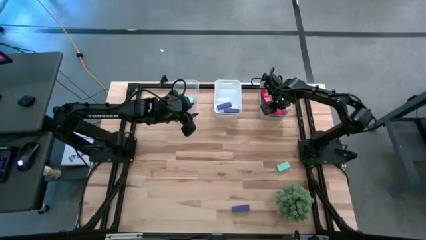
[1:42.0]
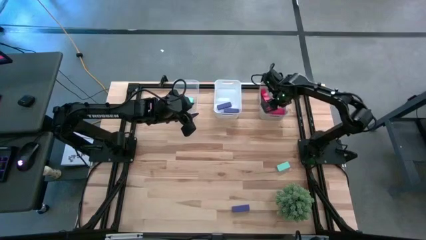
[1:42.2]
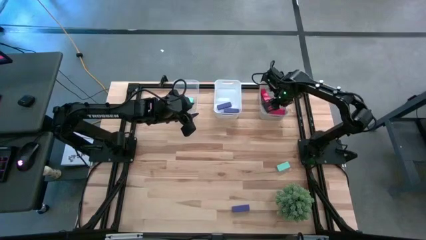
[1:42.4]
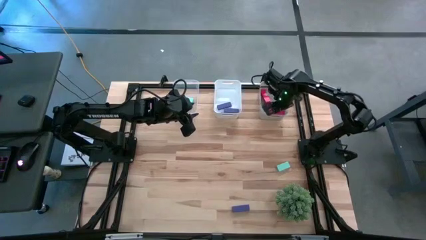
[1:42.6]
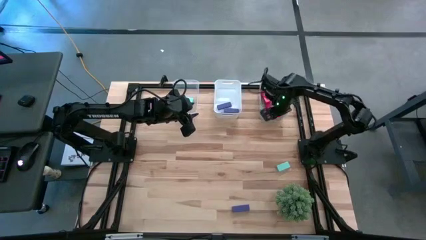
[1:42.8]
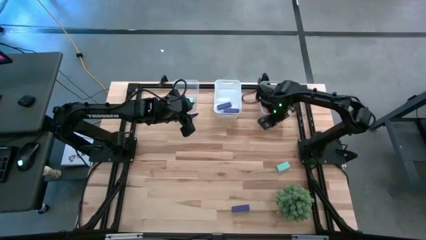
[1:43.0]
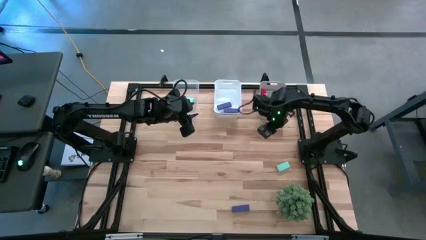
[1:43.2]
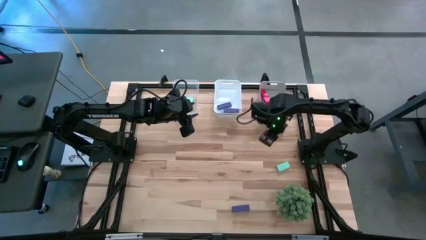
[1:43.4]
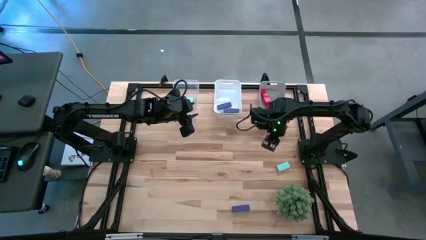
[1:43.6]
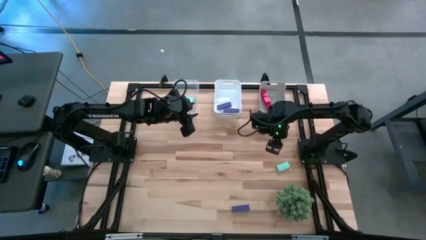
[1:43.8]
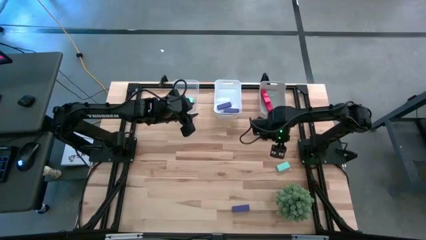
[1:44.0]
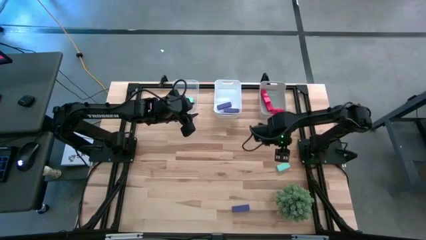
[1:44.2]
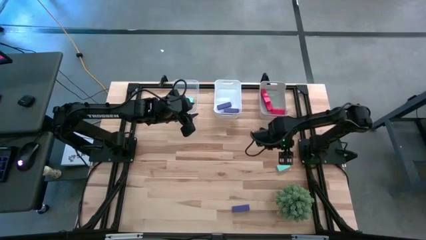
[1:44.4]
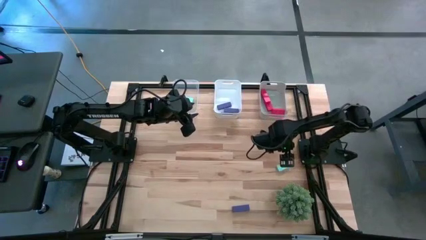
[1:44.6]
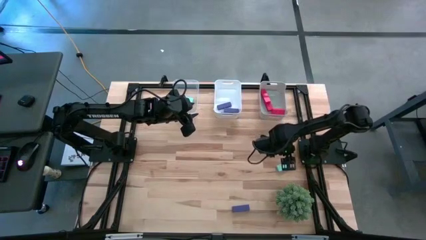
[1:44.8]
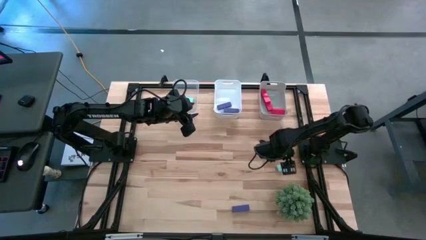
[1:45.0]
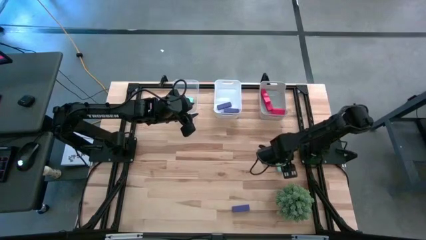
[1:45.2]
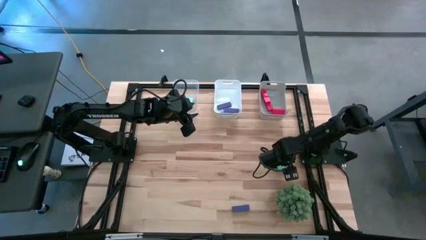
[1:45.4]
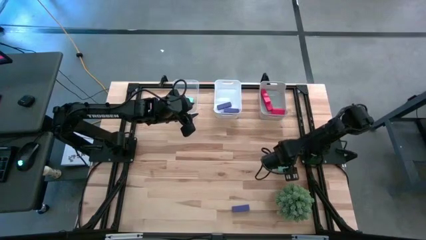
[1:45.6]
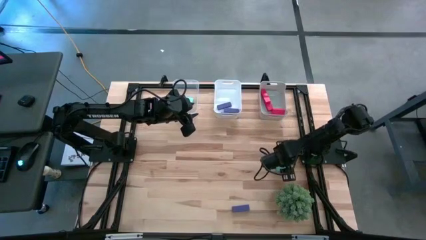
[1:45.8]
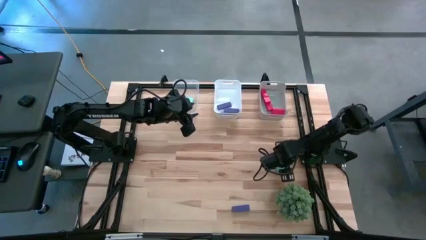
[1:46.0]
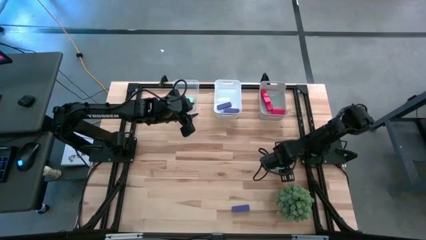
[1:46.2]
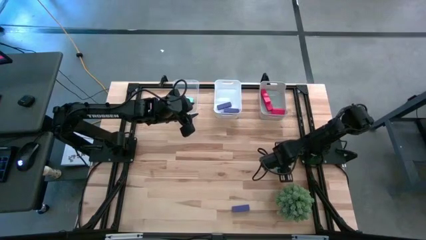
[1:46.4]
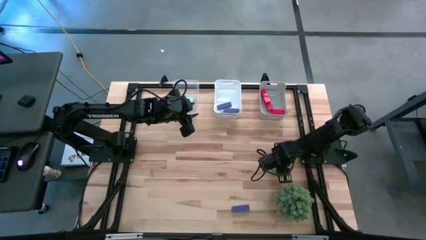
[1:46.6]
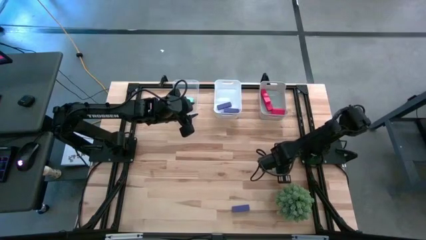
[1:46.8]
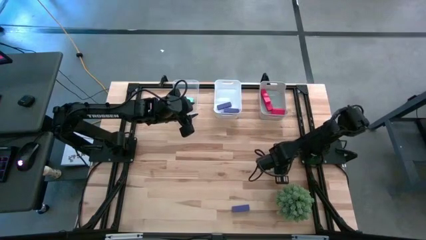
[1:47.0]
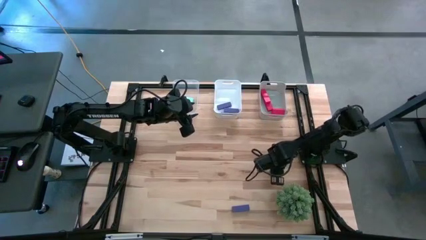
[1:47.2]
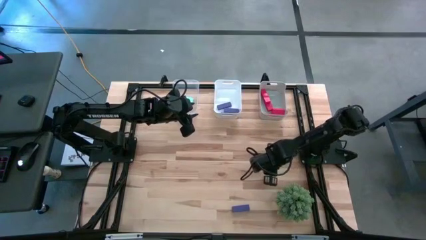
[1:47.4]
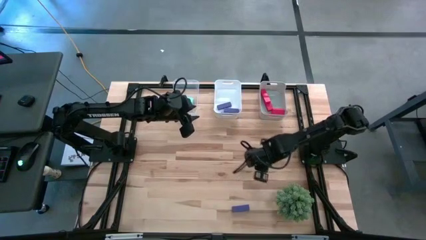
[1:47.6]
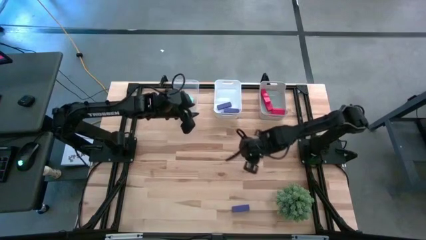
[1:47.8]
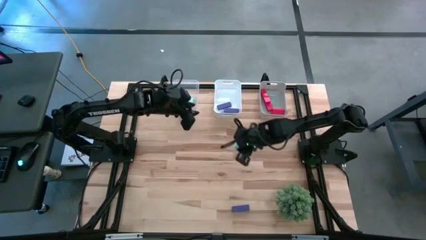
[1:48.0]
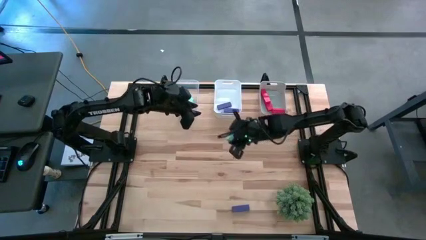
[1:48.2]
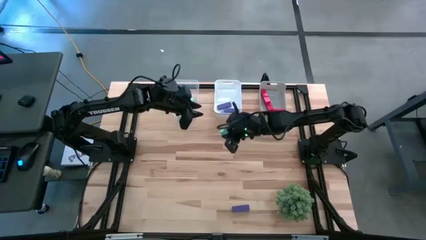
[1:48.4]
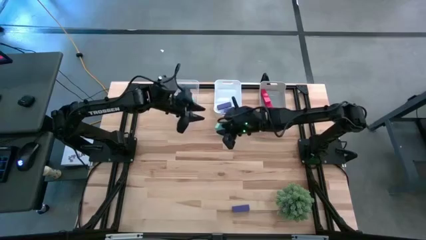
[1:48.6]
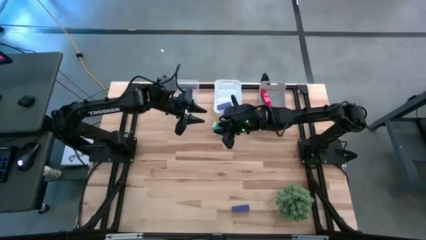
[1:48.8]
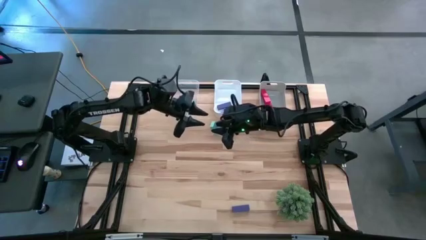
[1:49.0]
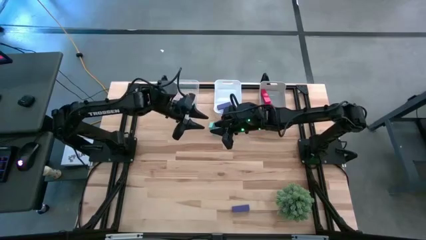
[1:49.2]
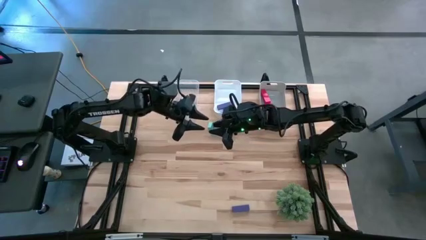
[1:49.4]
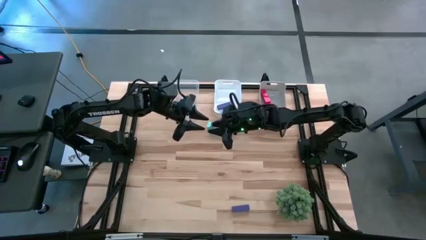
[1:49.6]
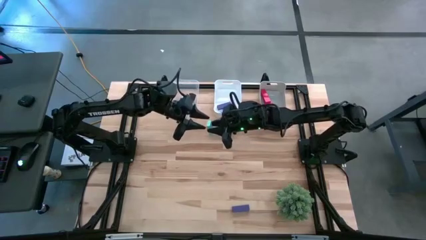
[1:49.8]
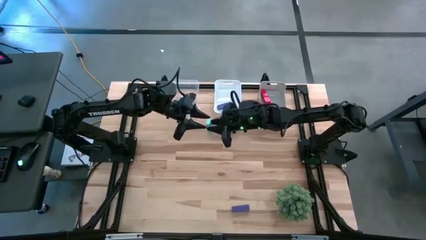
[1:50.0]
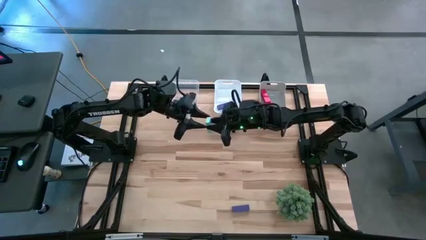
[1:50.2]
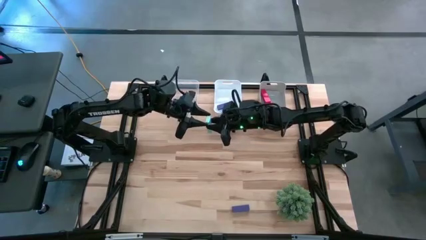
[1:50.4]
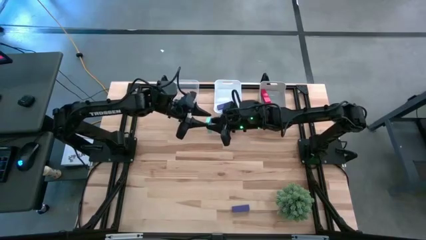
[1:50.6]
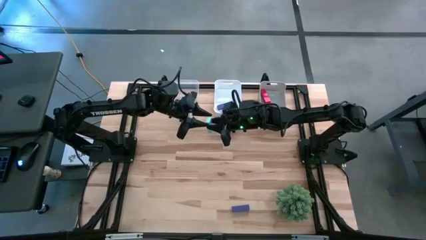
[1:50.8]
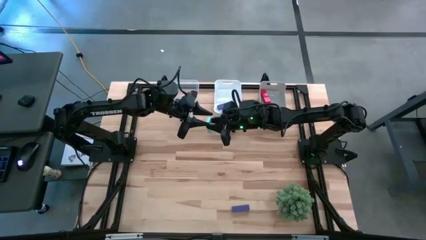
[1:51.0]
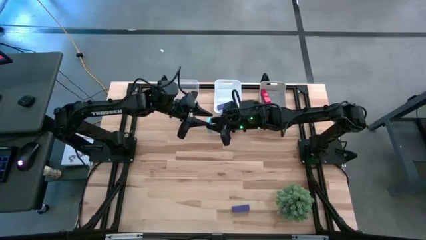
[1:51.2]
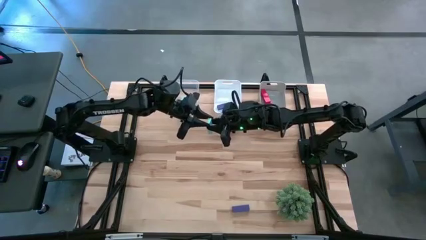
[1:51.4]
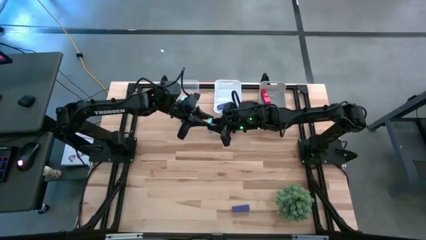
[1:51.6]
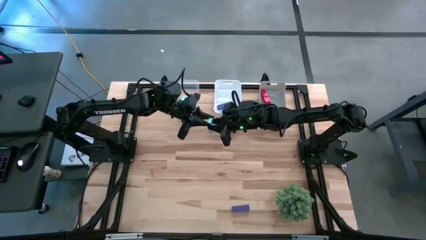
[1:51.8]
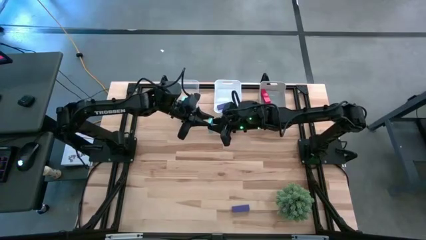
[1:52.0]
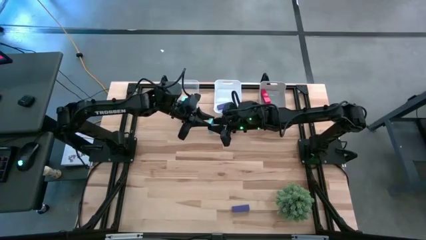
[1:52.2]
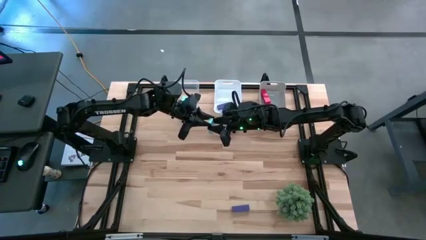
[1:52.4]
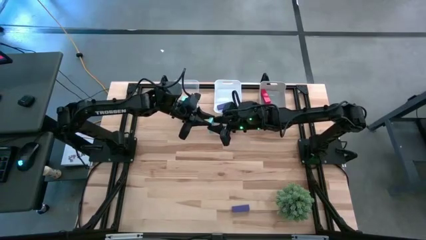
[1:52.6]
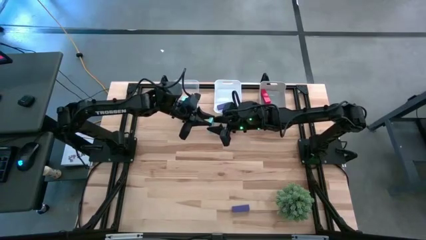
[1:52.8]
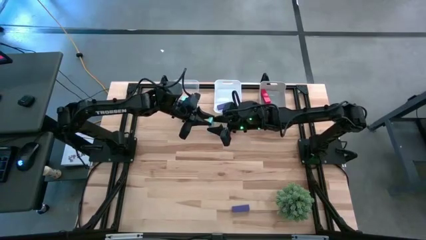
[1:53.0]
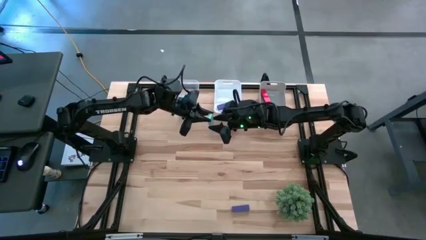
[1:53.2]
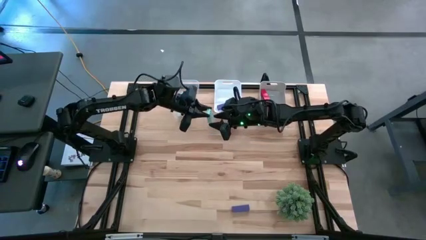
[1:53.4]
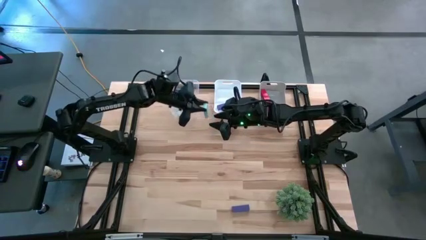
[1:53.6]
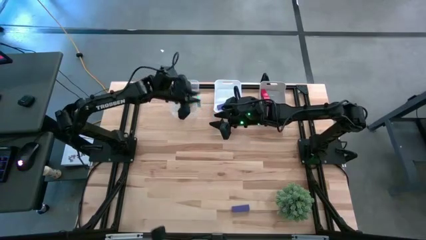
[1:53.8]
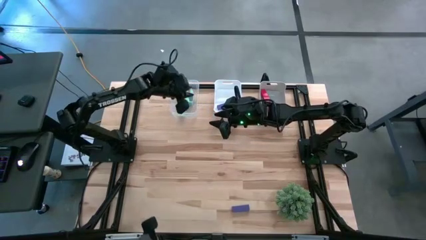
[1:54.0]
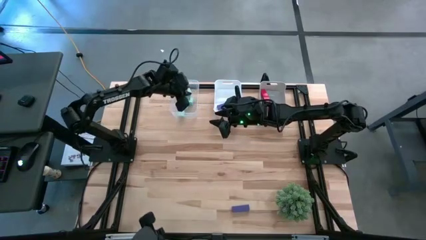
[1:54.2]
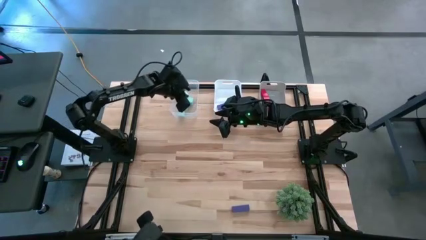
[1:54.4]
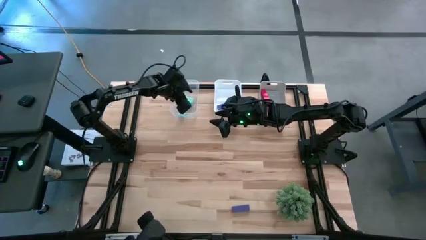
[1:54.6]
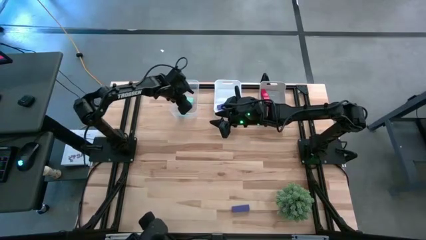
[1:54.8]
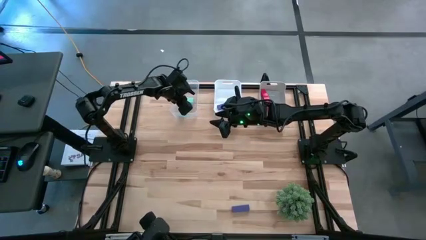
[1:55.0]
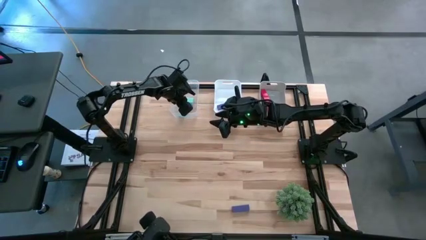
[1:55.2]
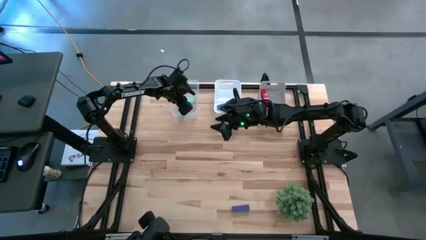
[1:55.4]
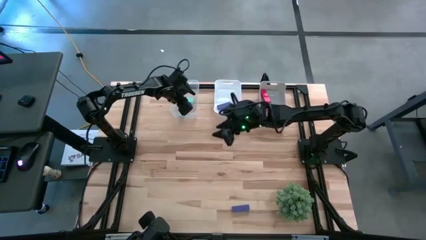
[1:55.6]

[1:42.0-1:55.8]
Task: Sort & place blocks by color
Put the blue block into the transparent bin

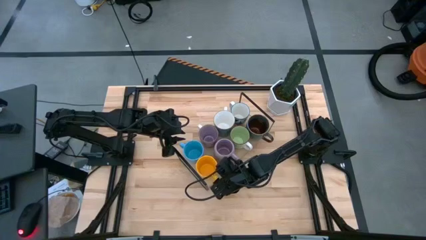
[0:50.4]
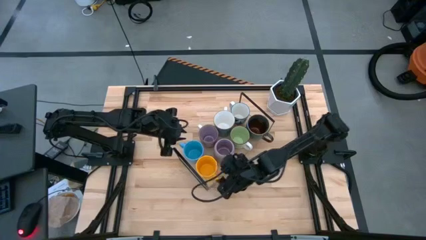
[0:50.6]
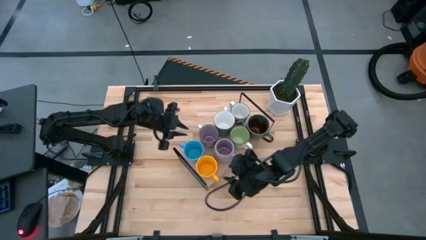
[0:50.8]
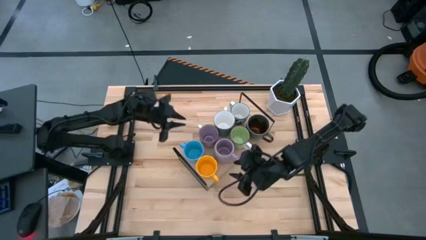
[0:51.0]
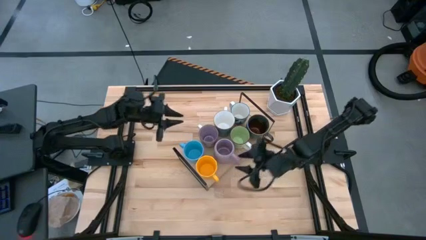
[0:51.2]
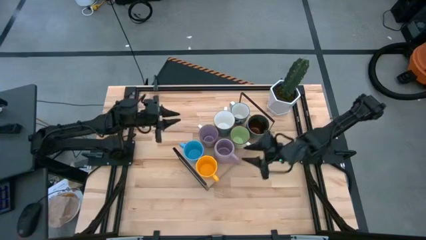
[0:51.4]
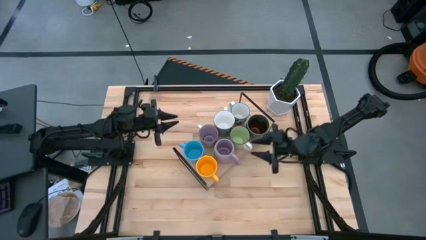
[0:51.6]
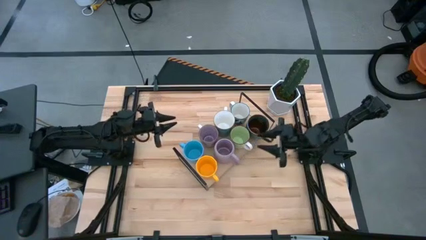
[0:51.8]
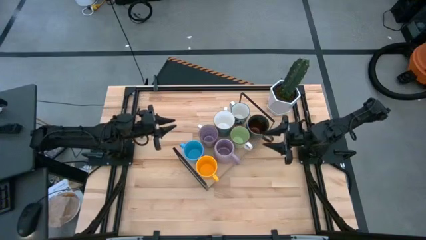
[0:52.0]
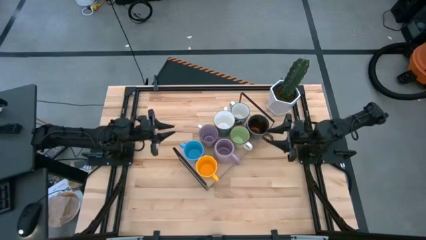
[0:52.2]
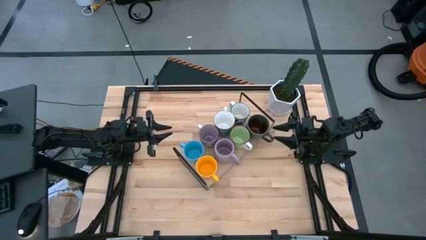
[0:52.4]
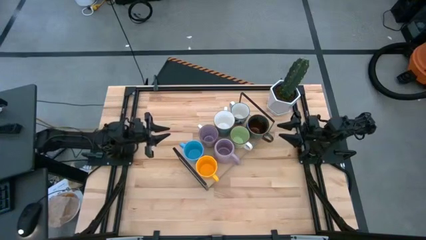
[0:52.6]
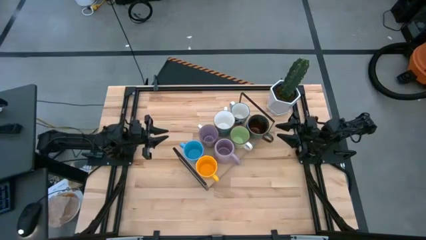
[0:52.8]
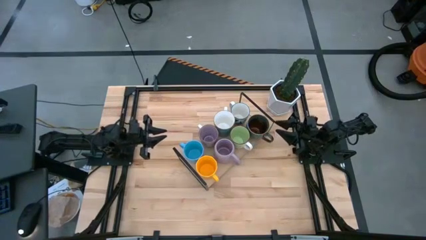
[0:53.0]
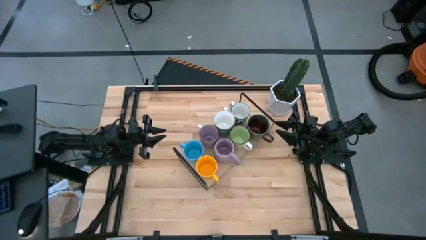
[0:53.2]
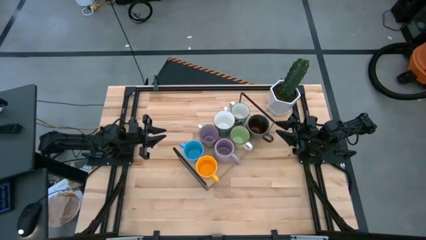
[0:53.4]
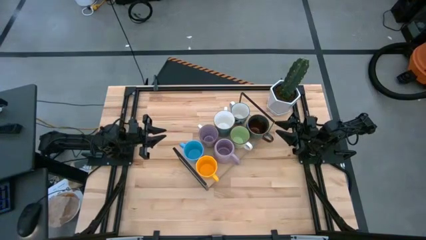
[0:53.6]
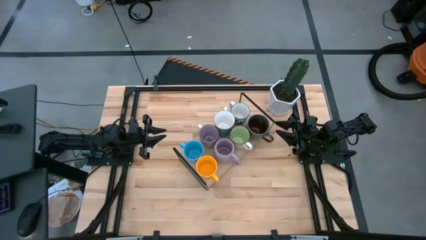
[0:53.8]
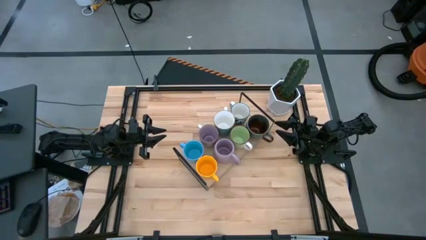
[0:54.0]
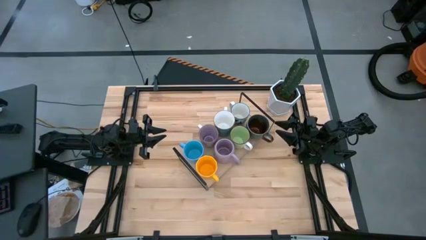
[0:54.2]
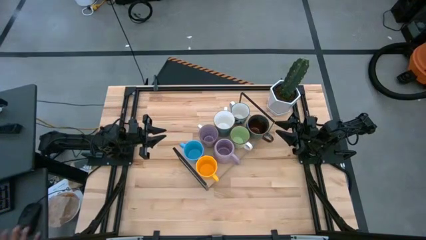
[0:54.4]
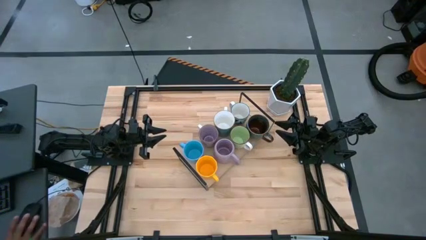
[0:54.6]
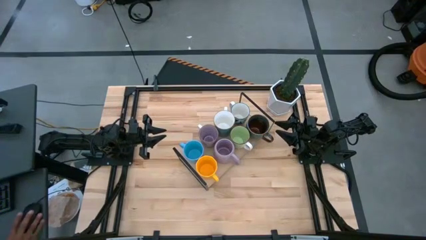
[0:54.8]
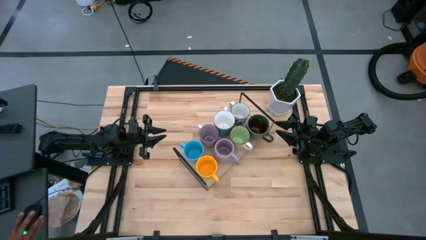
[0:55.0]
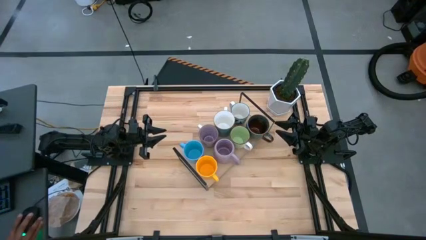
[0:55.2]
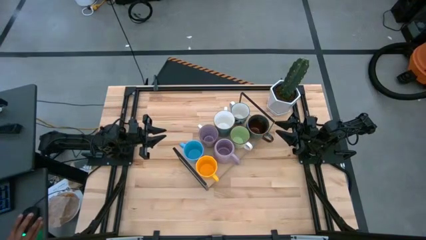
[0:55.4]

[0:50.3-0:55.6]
Task: Place coffee mugs
Return to Home Position
